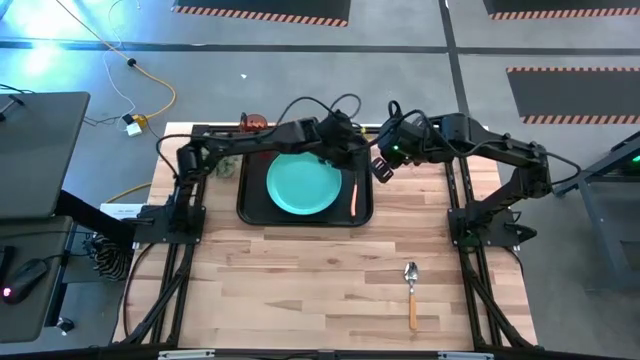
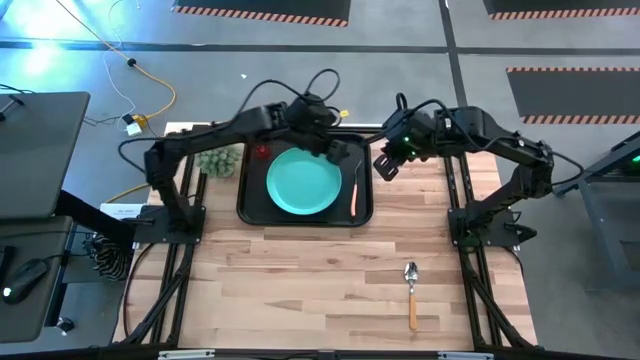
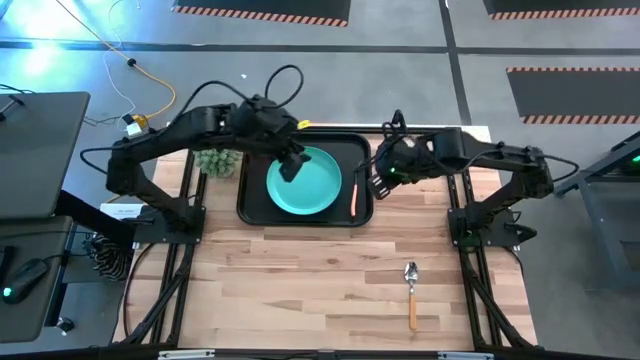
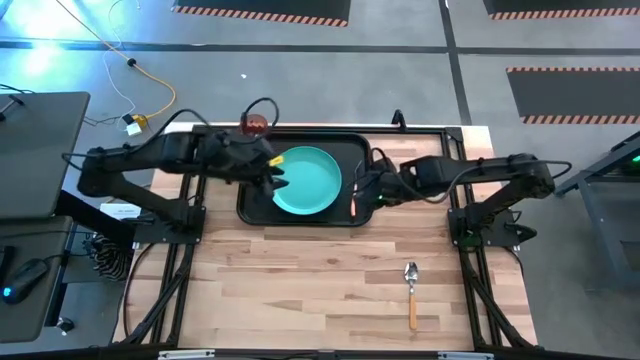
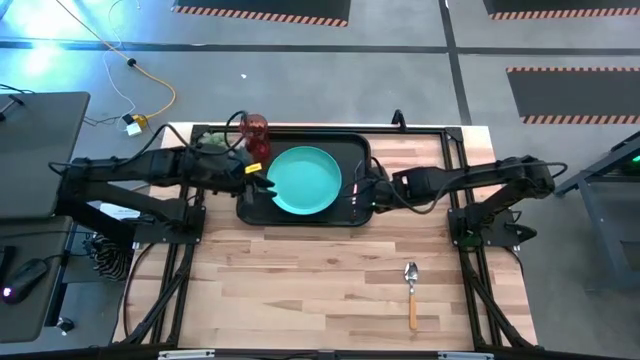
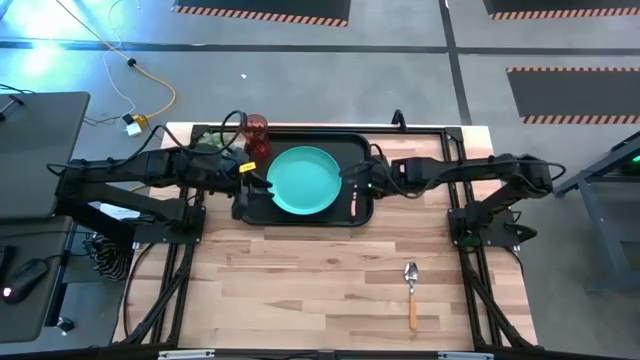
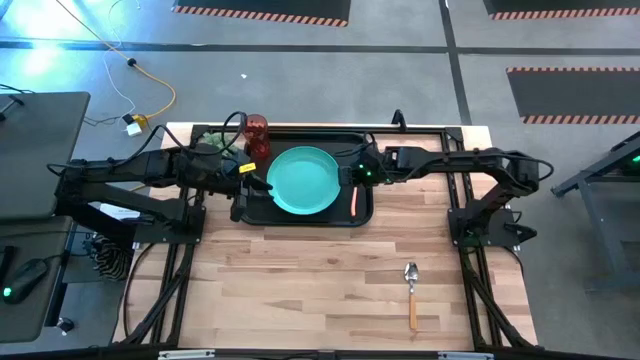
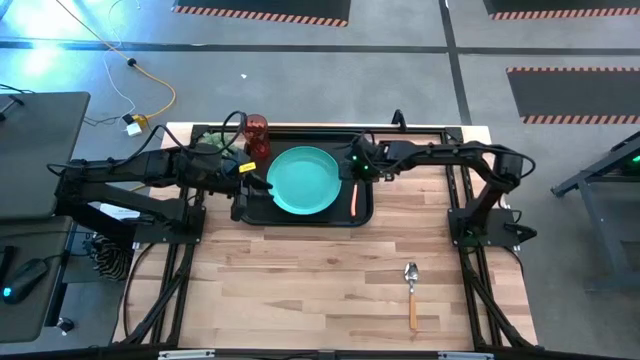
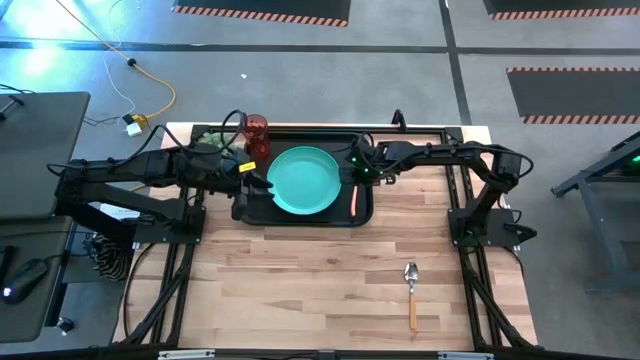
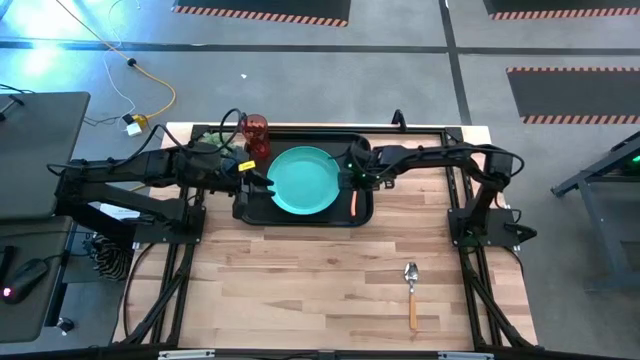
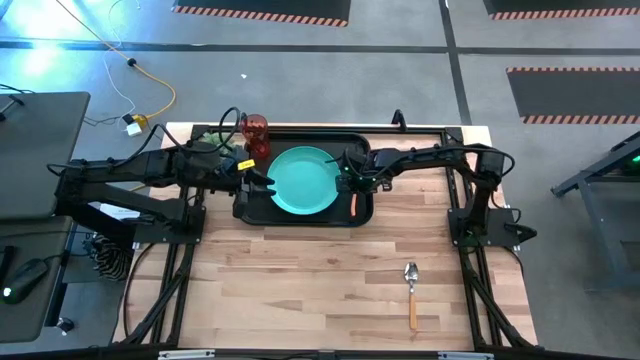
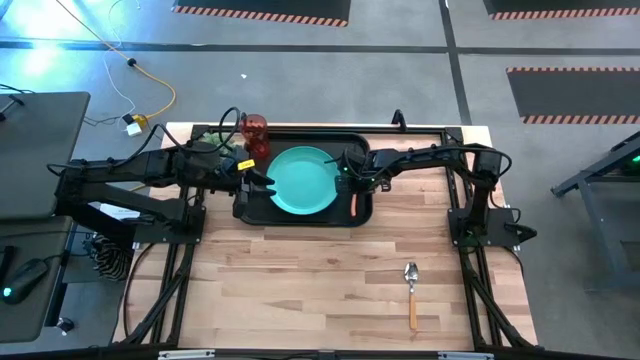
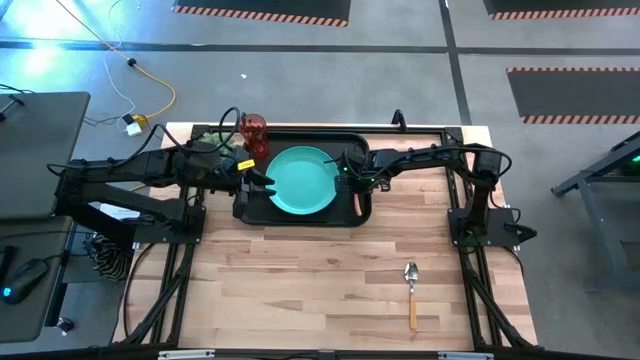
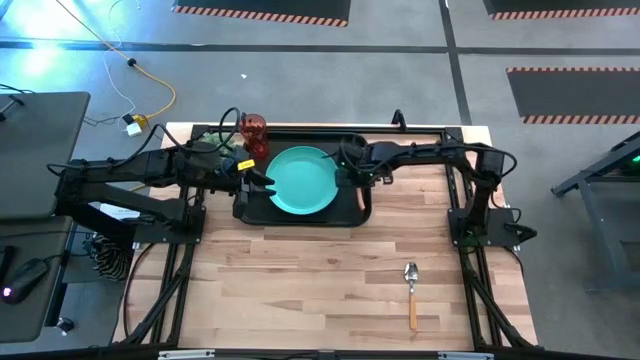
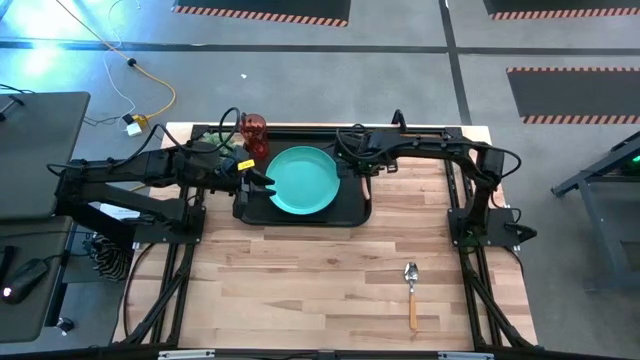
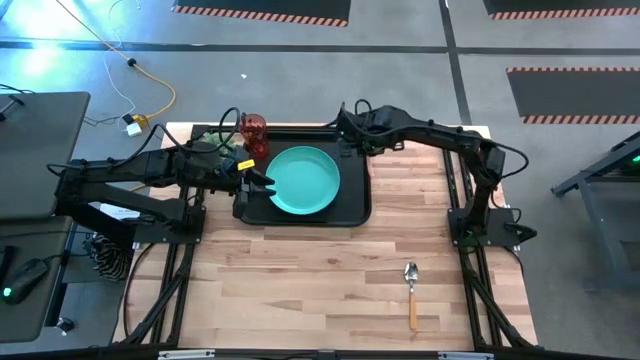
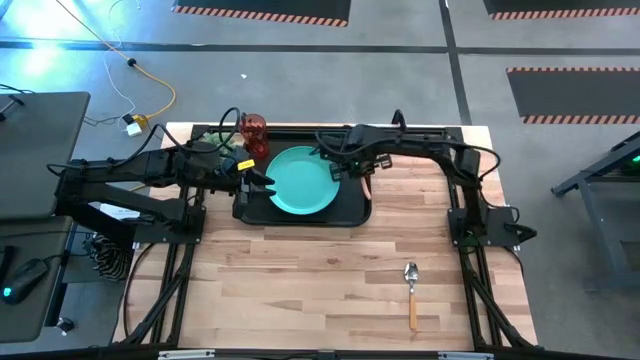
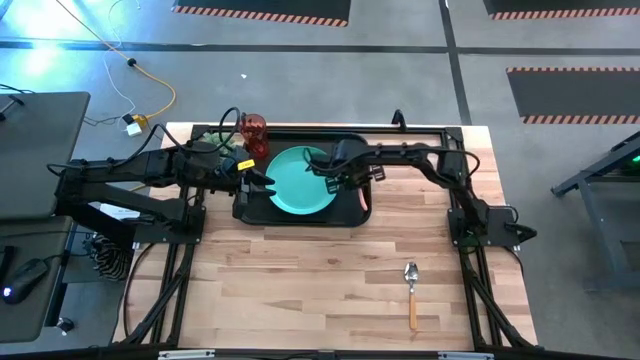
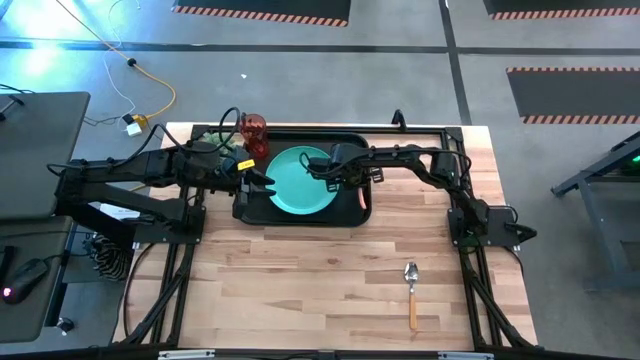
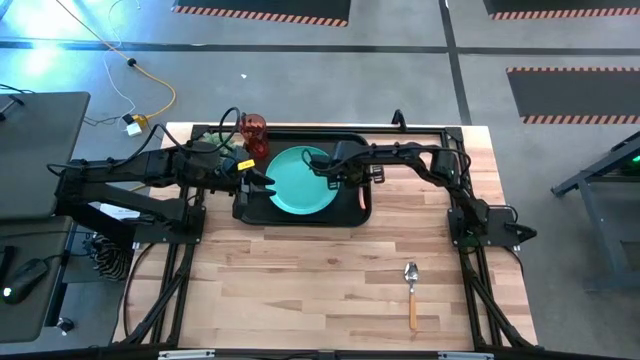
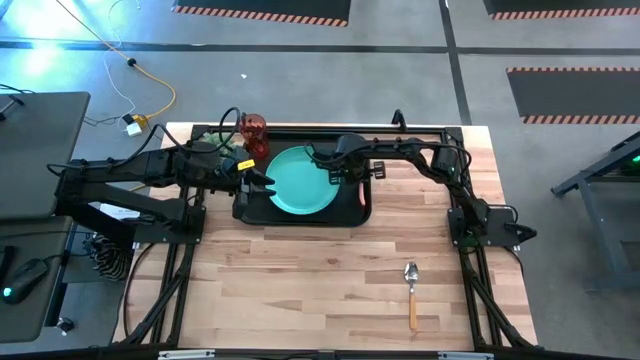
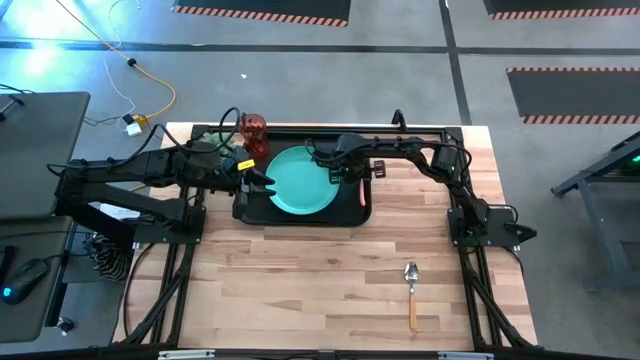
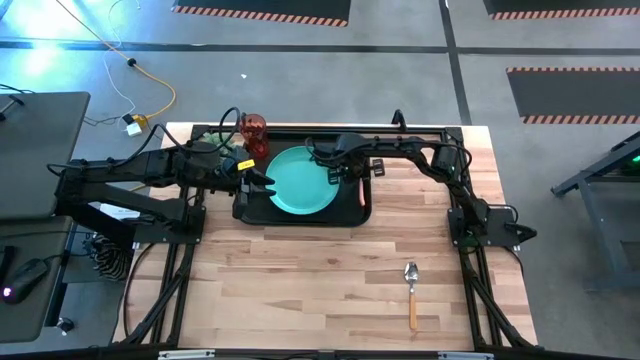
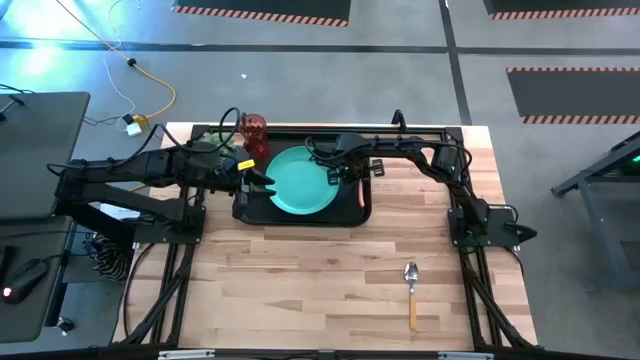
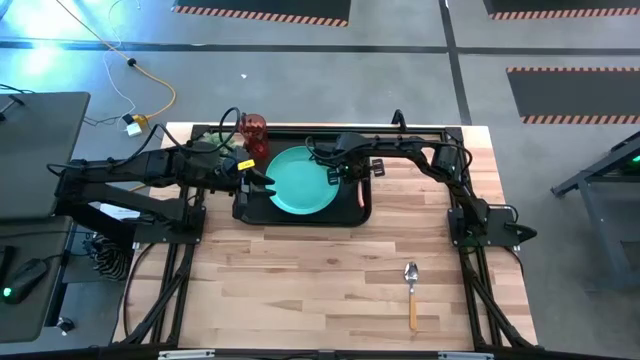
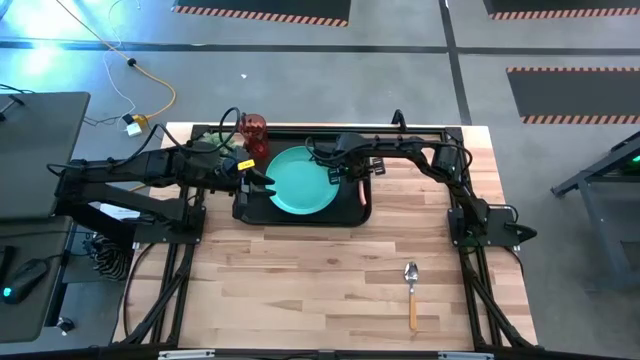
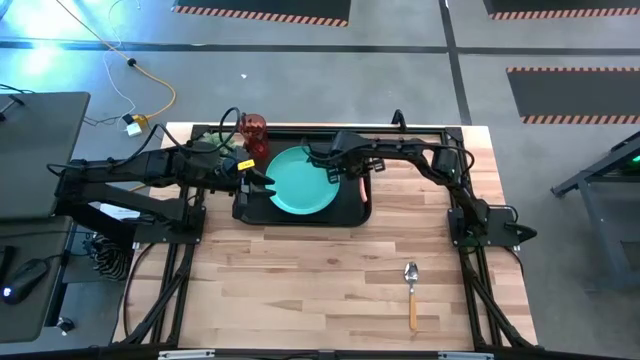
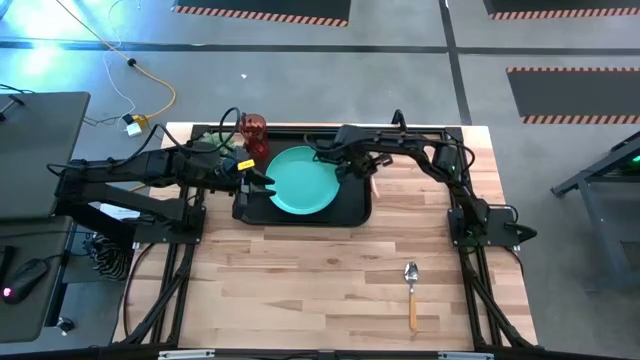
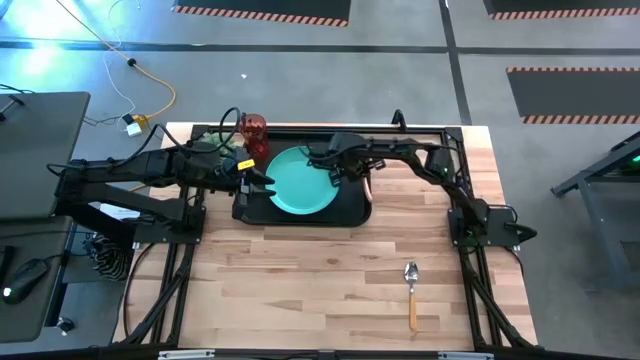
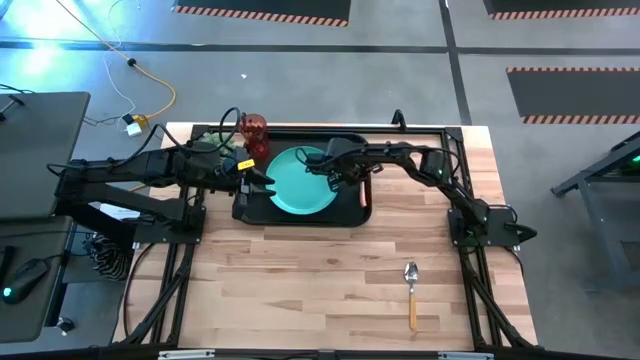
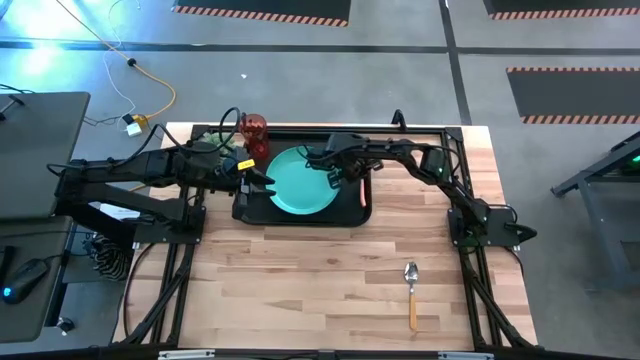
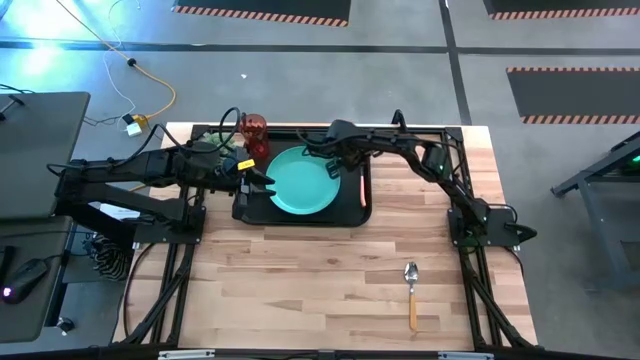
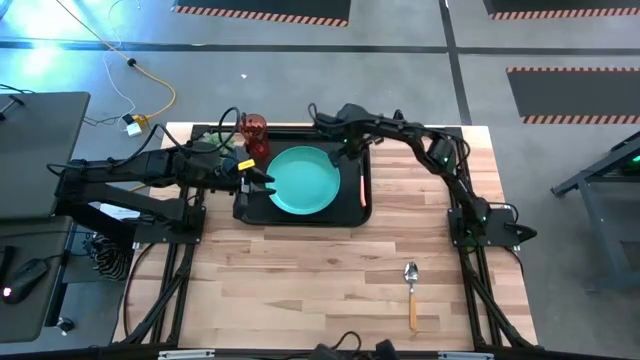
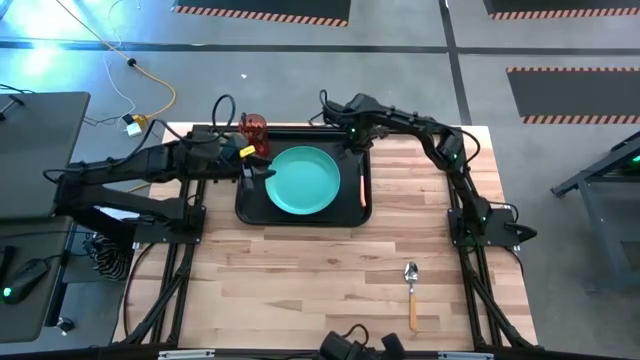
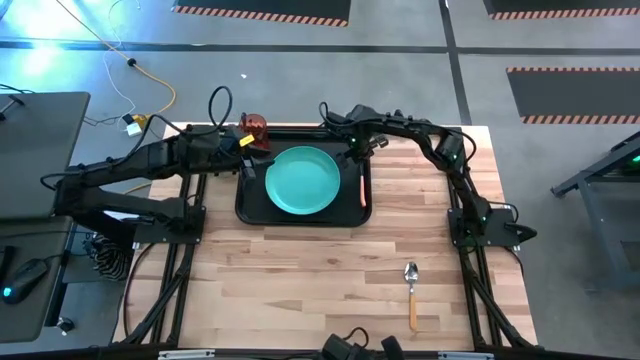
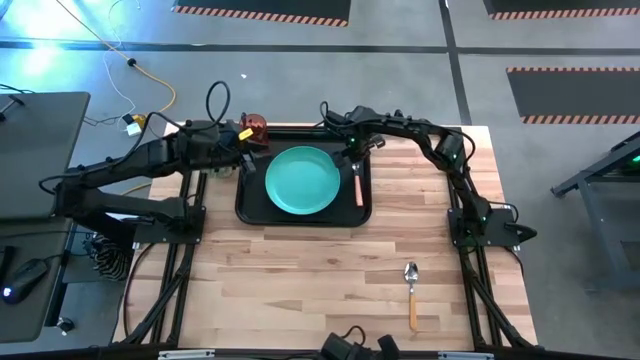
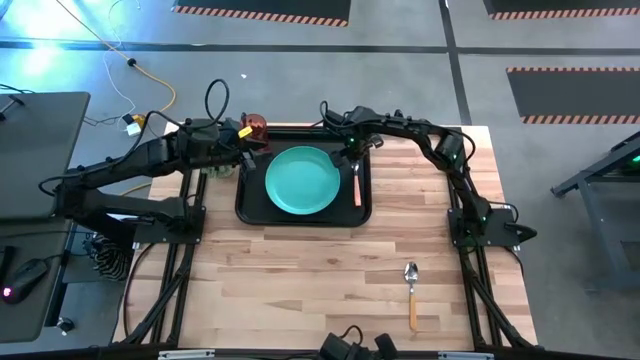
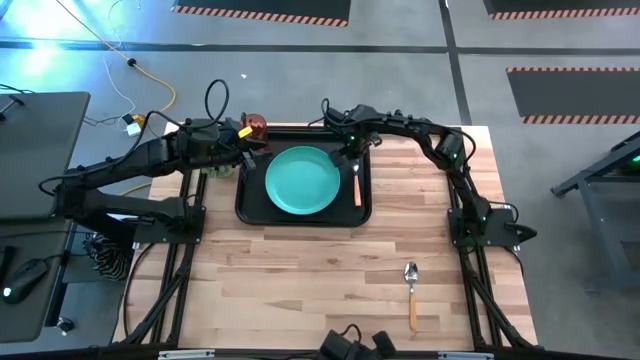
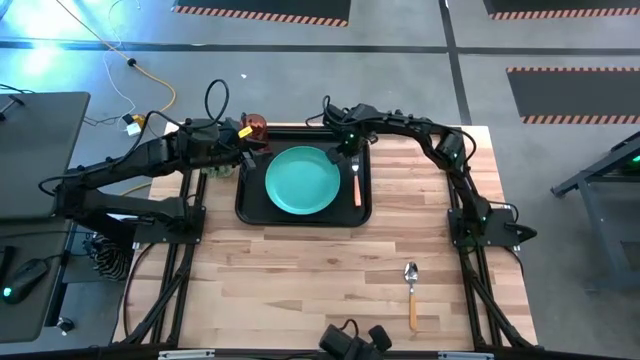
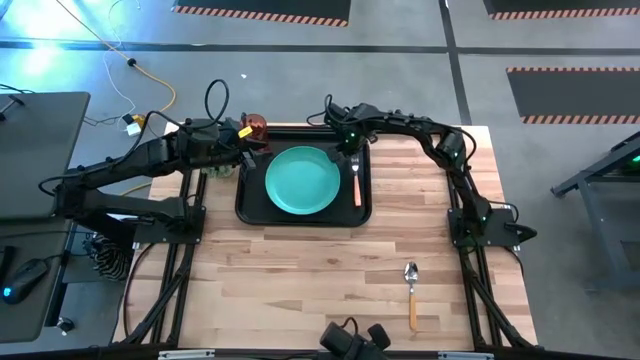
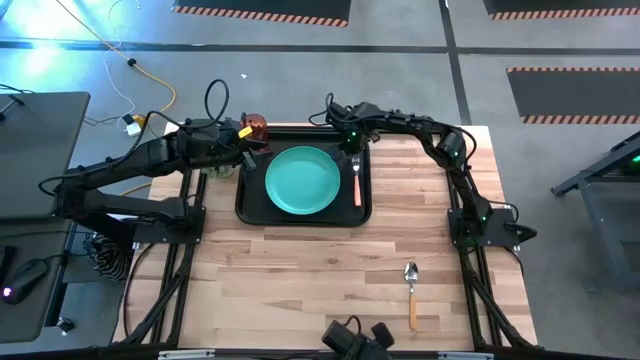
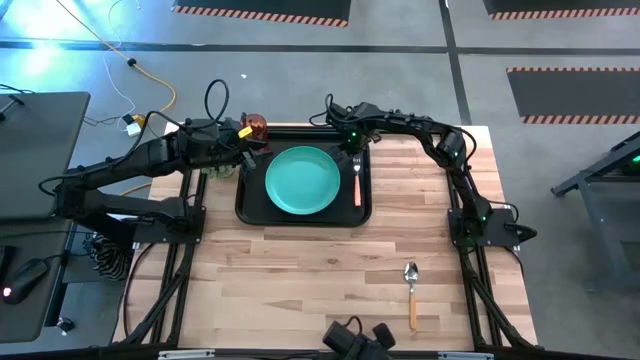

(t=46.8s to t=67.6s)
Task: Pick and place plate/cup/fork/spoon on tray
Put the orange fork to the right of the blue plate on the black tray

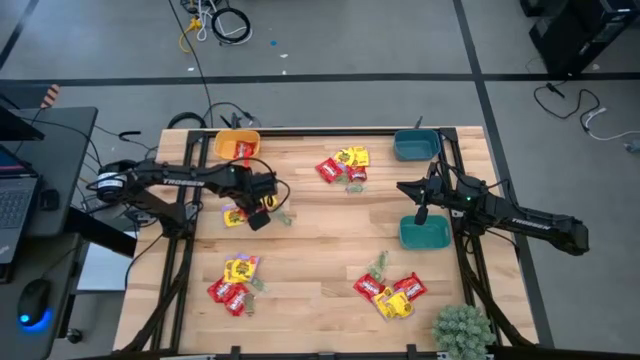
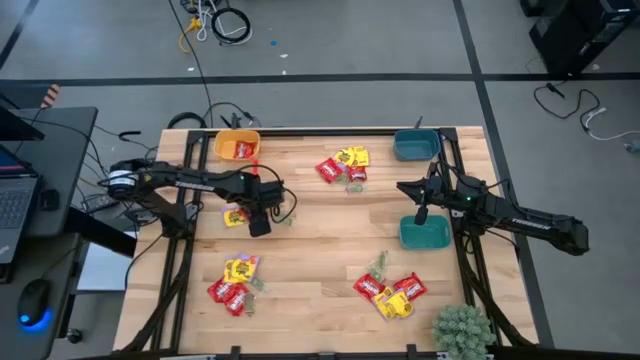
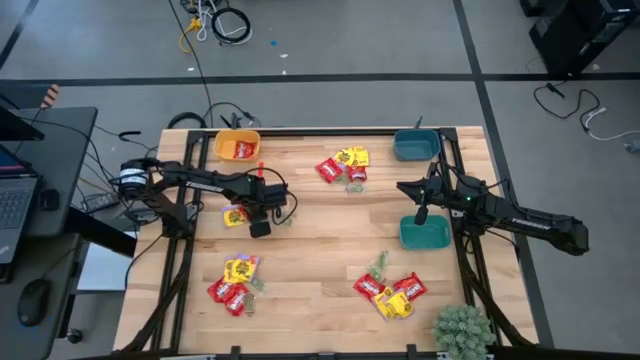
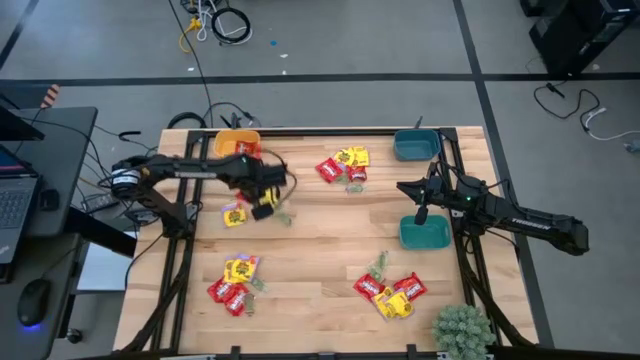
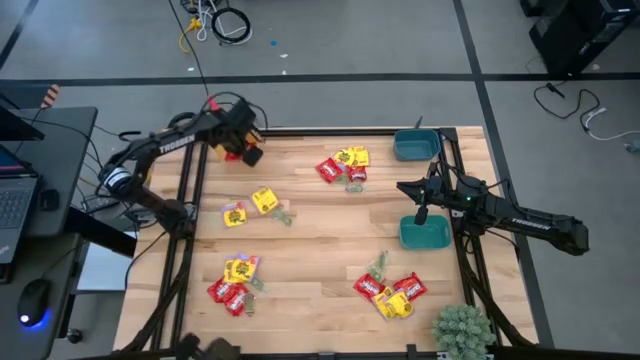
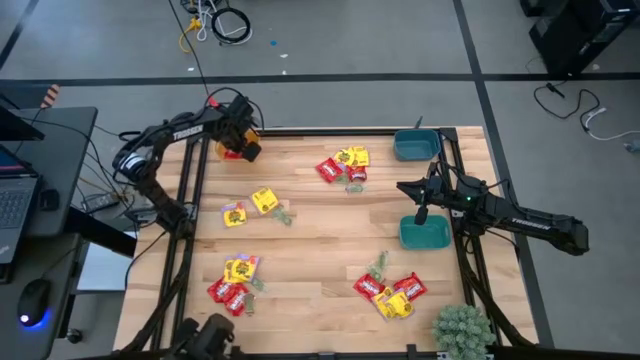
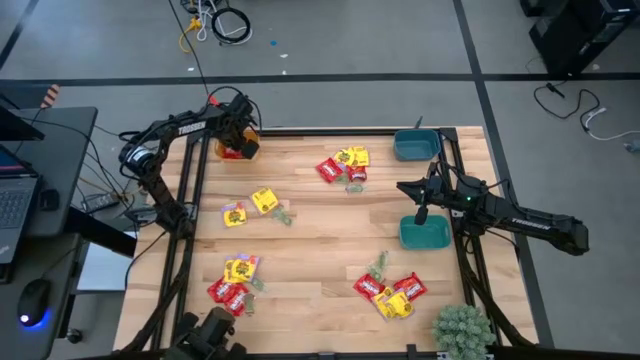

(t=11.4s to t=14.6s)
Task: Sort candy
Put the red candy into the yellow bin
